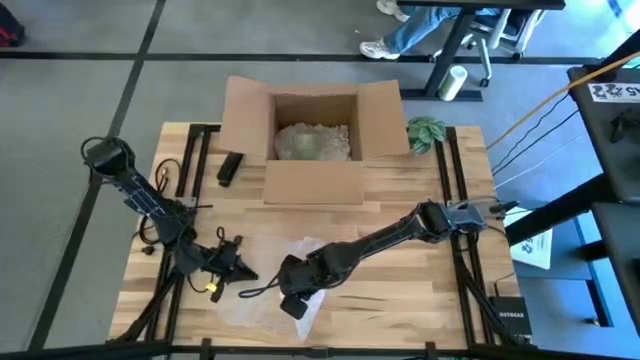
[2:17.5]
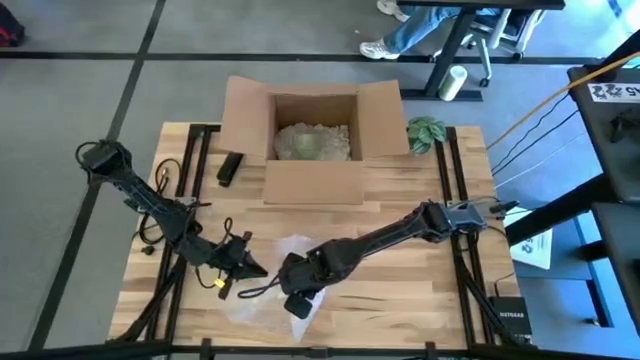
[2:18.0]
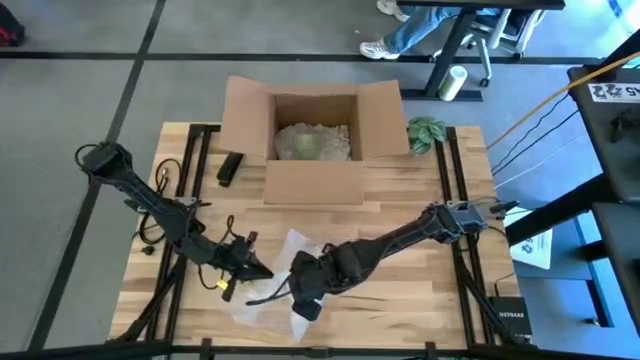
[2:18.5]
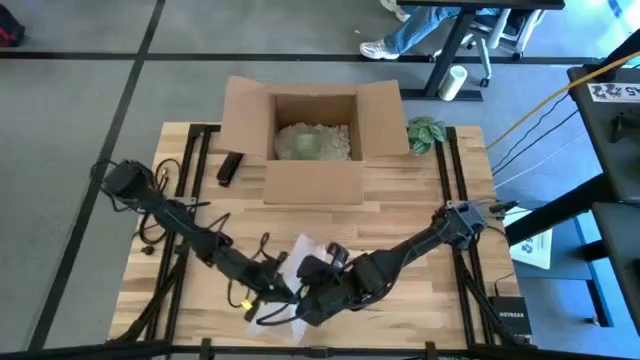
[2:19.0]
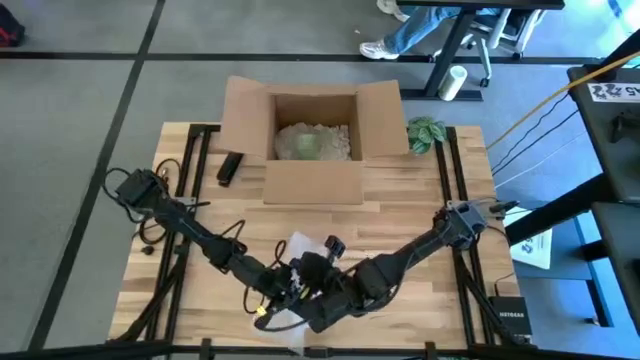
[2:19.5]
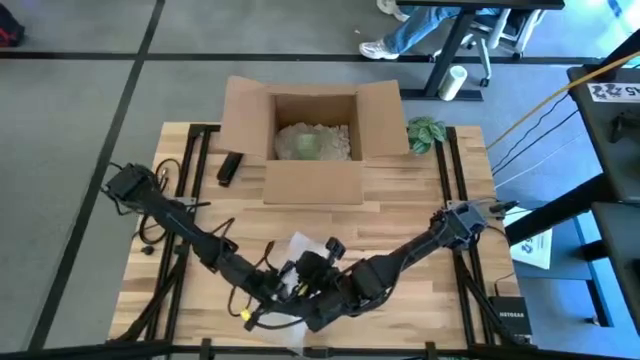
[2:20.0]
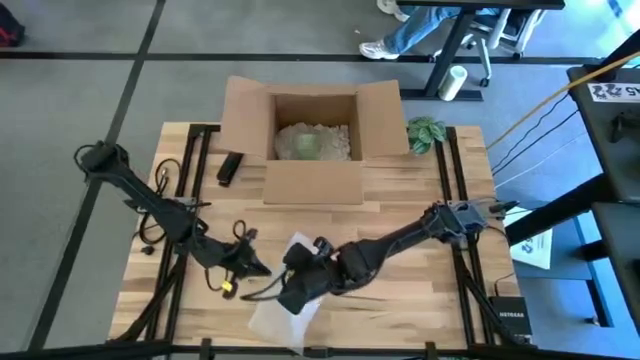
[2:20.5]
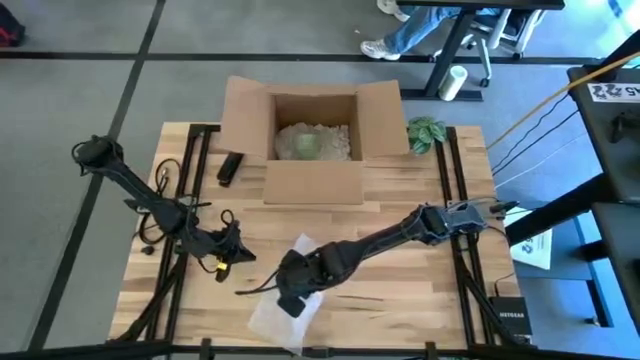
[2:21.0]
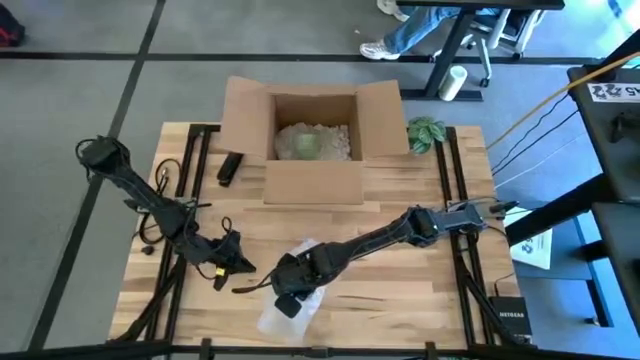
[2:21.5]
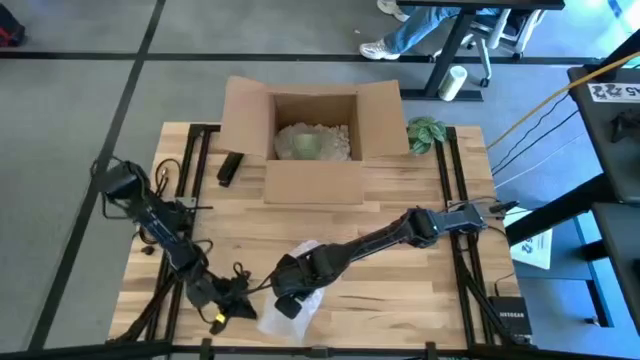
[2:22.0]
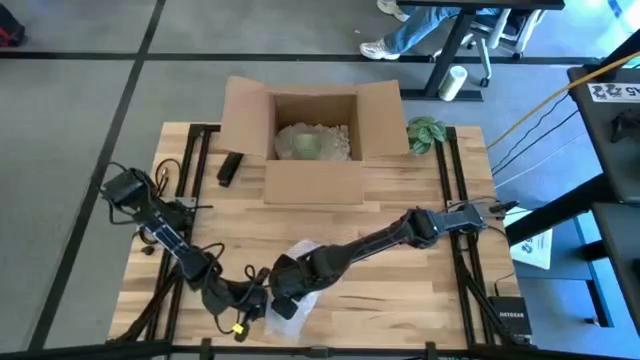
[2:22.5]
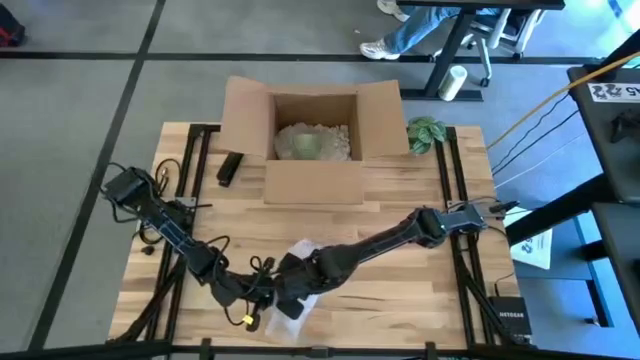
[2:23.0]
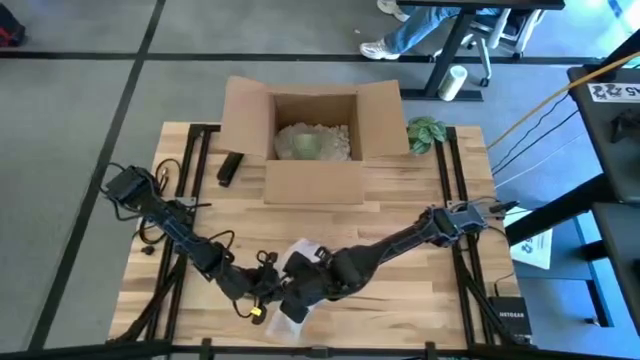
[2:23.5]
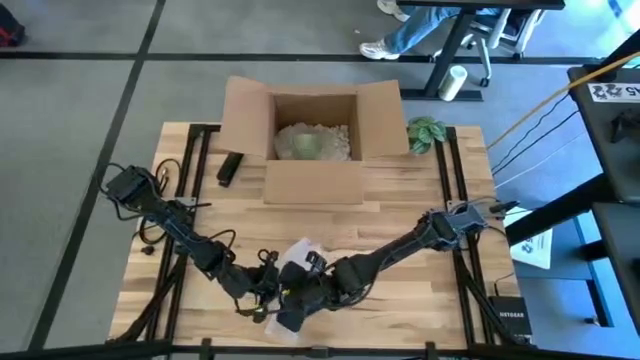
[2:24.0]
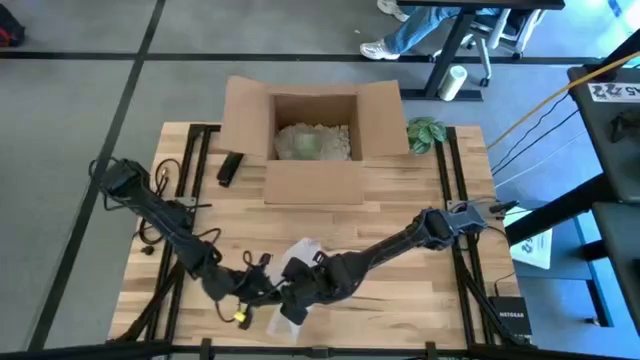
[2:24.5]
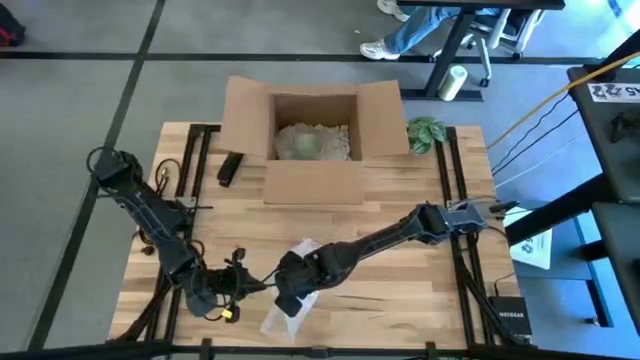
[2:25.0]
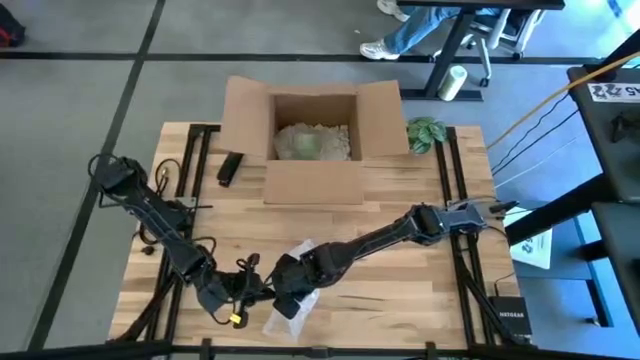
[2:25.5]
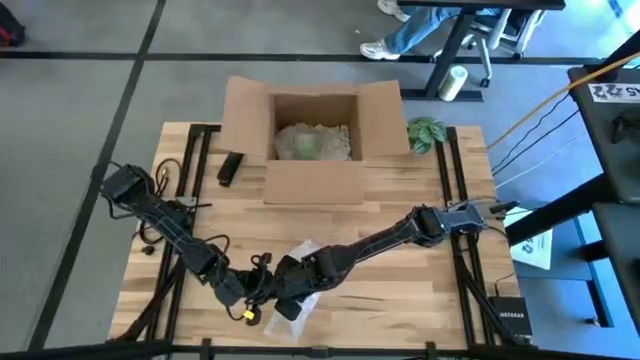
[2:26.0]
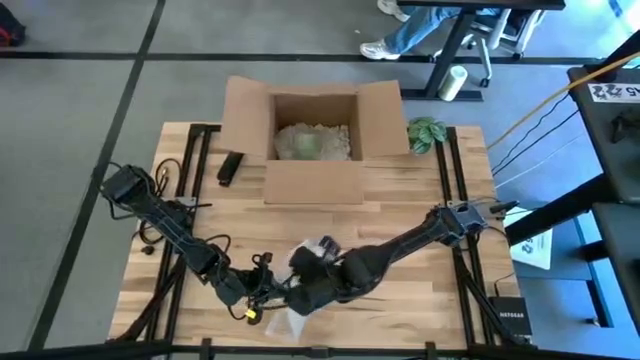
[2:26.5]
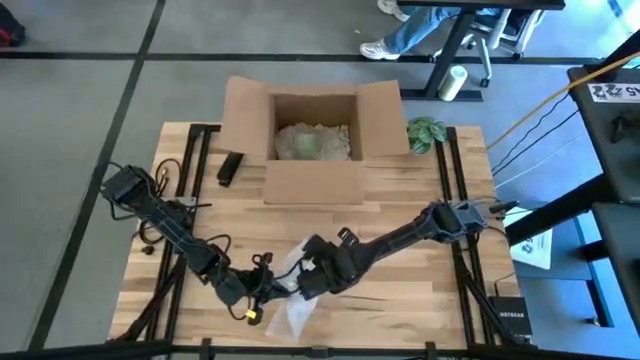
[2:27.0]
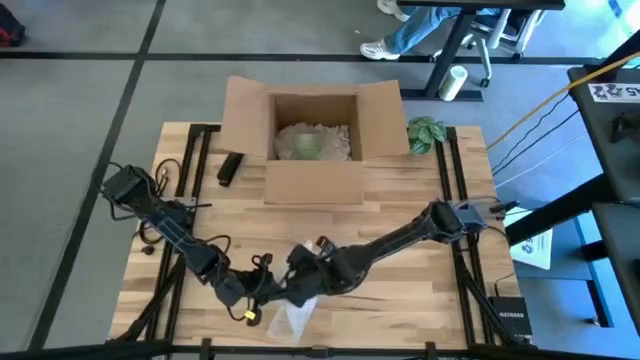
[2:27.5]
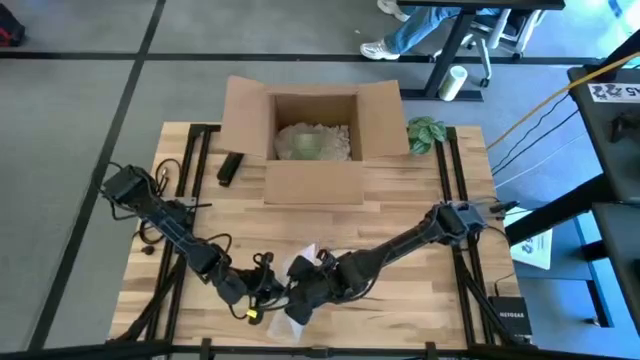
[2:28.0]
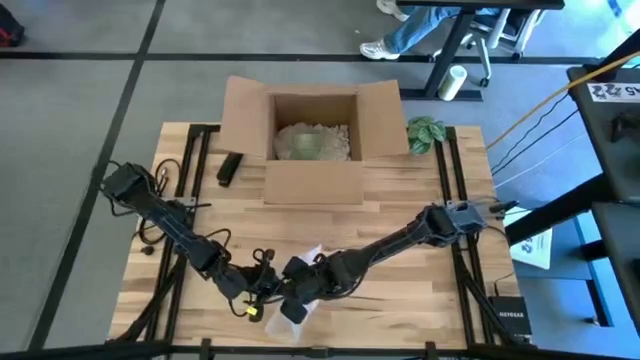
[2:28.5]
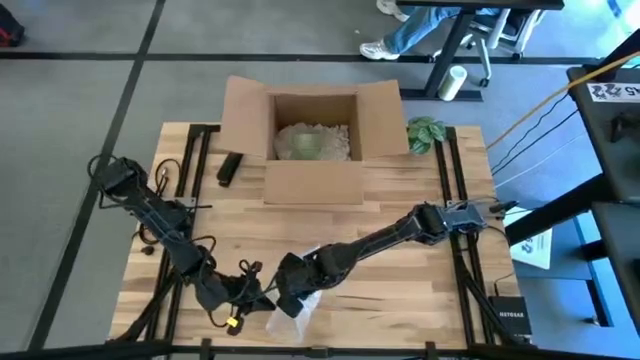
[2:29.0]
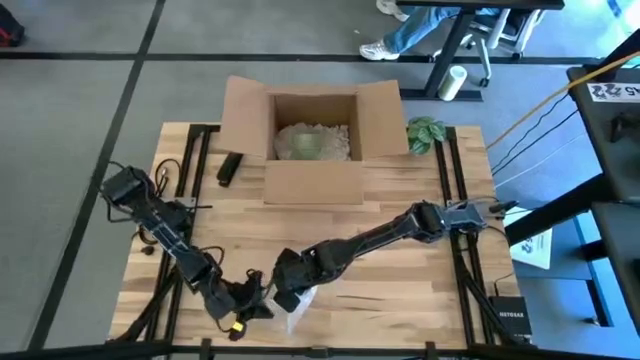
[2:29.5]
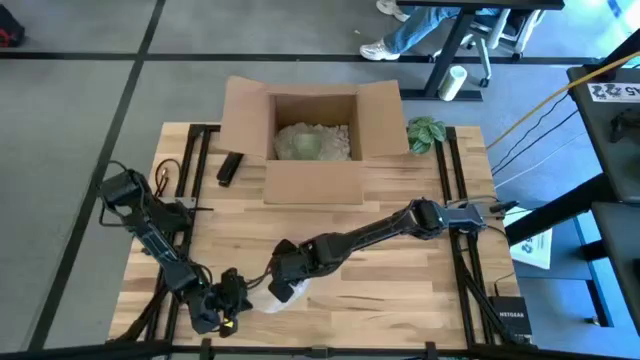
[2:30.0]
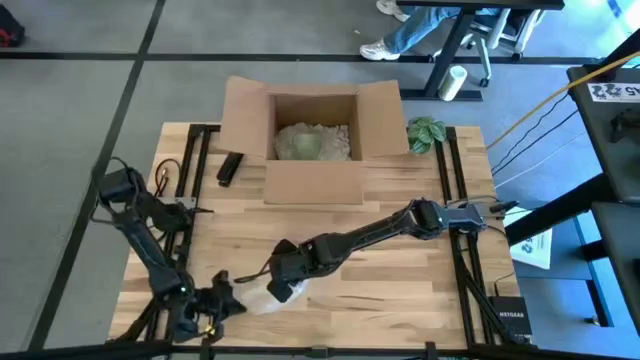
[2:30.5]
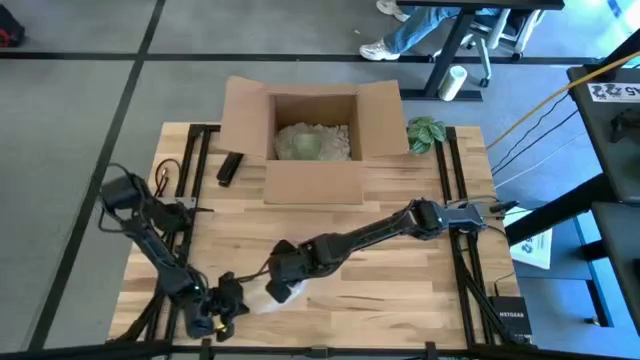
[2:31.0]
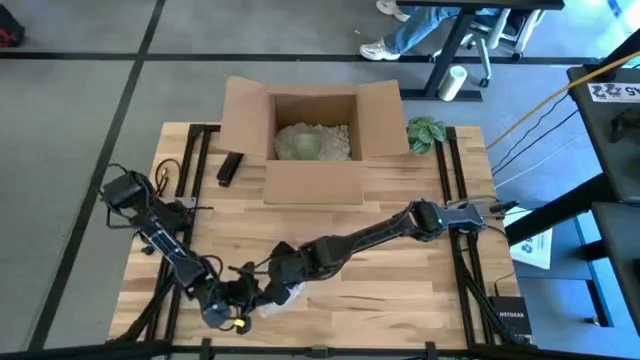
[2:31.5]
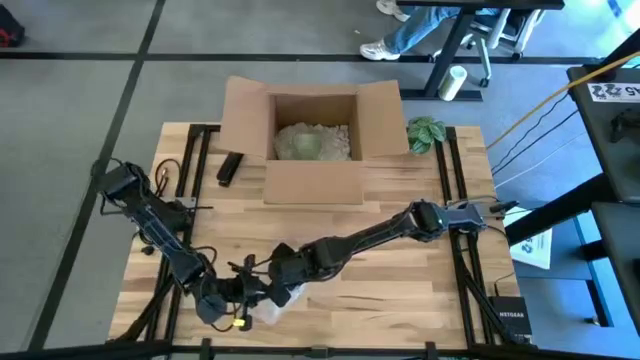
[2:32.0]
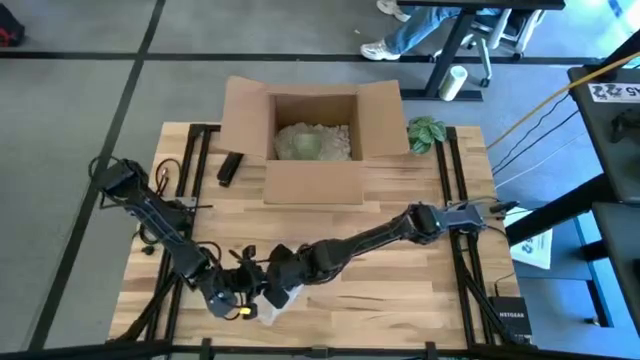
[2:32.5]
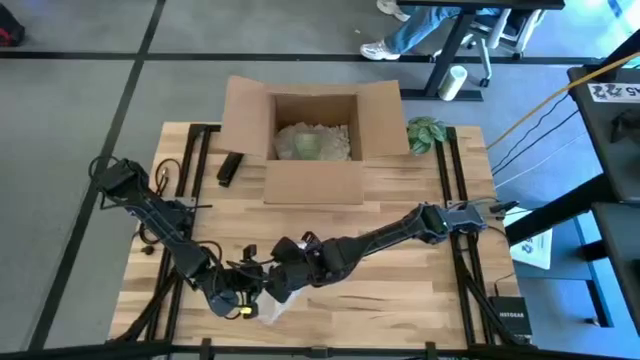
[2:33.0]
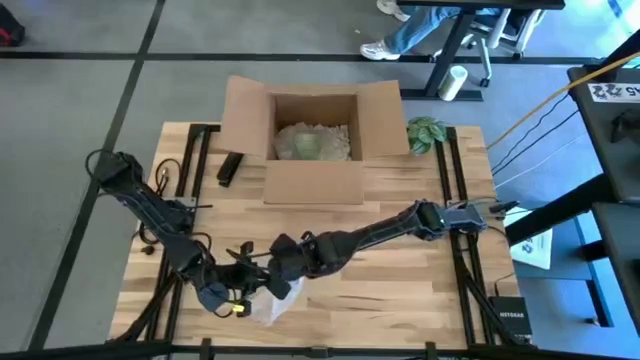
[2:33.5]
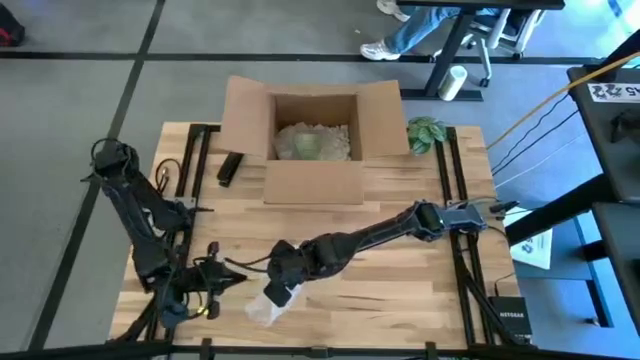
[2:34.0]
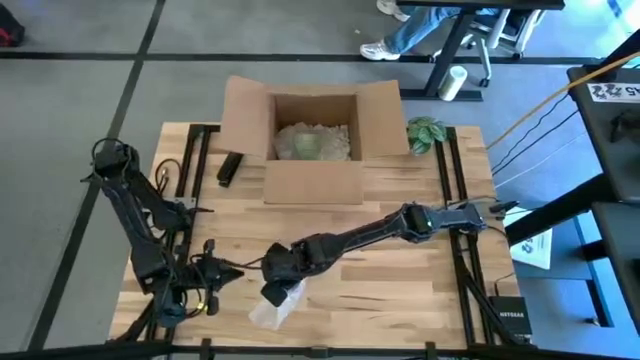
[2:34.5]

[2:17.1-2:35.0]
Task: wrap mug
Wrap the blue mug with bubble wrap

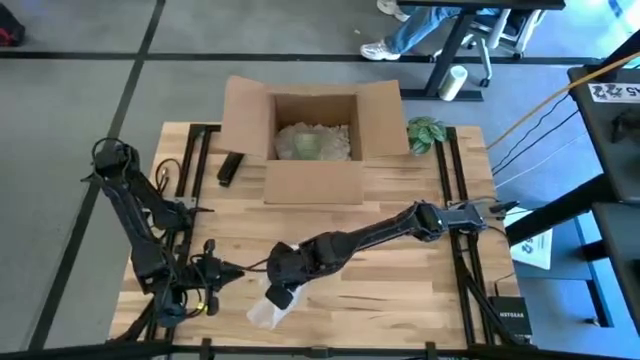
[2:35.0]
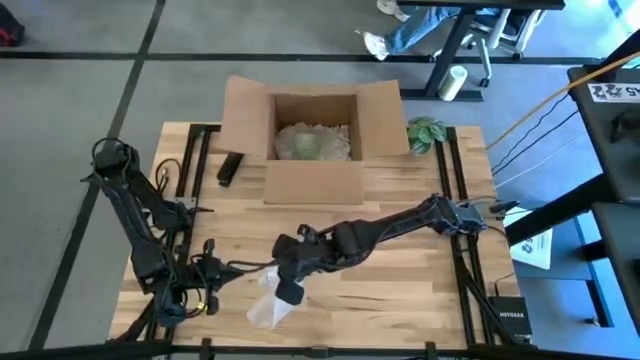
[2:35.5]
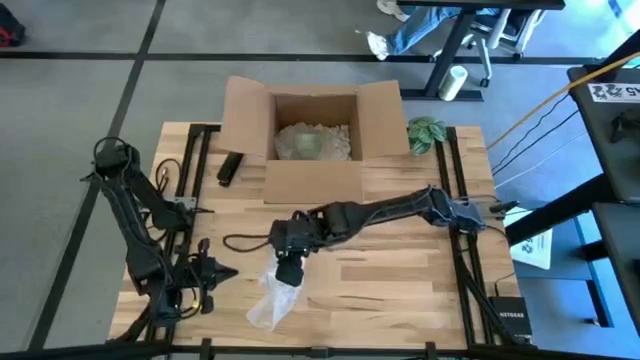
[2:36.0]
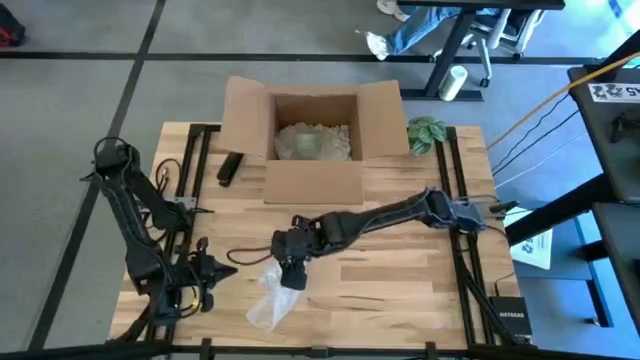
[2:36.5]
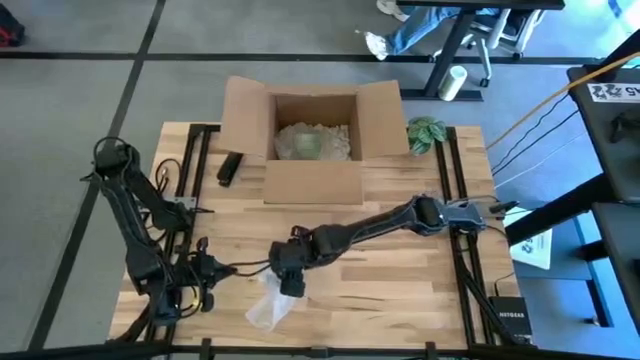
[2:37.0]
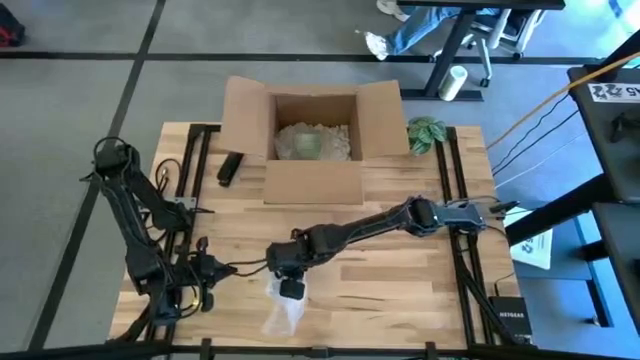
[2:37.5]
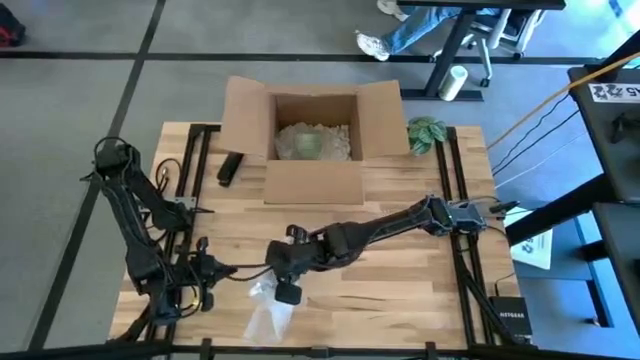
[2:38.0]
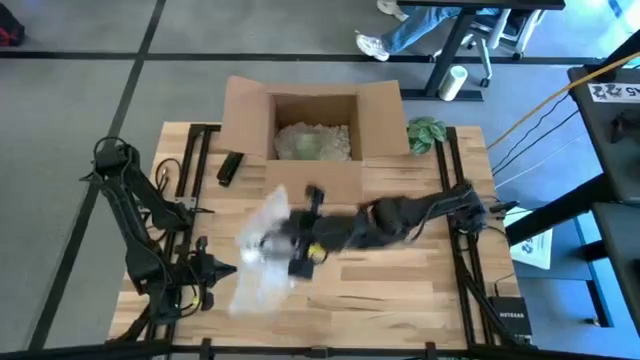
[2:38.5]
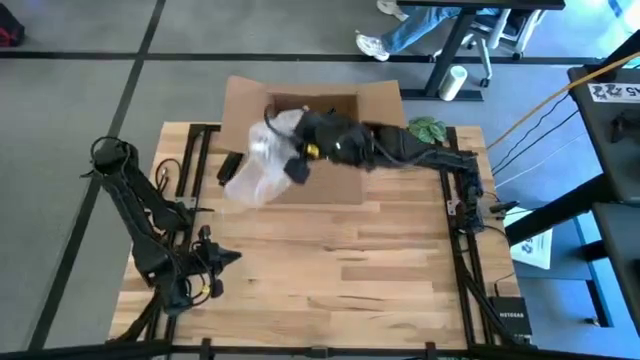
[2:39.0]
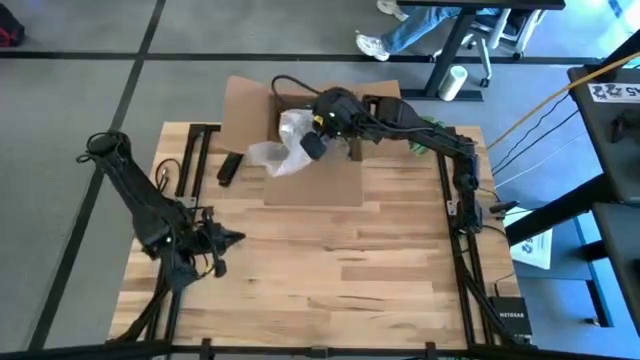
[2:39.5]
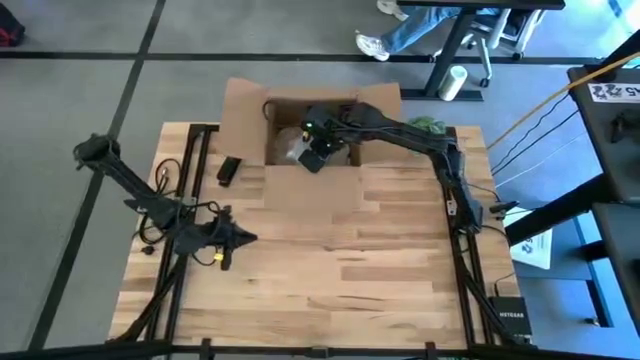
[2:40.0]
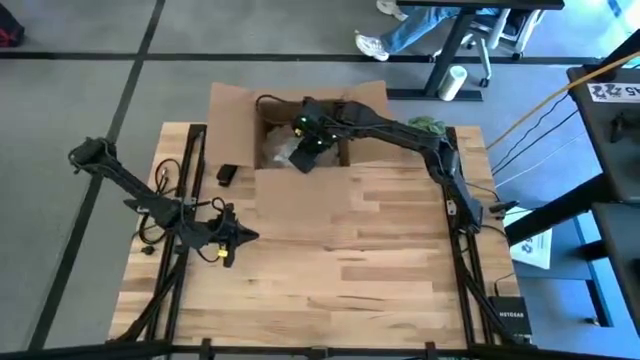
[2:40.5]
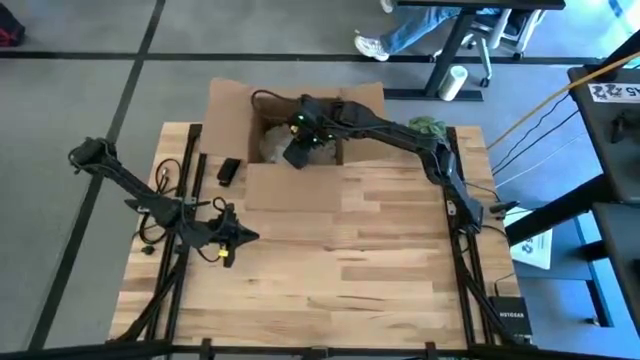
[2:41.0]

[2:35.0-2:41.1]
Put the wrapped blue mug into the cardboard box
